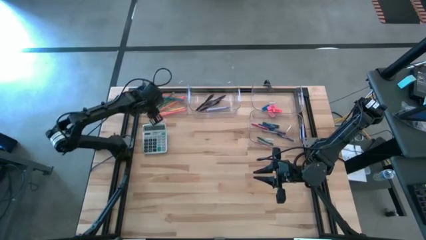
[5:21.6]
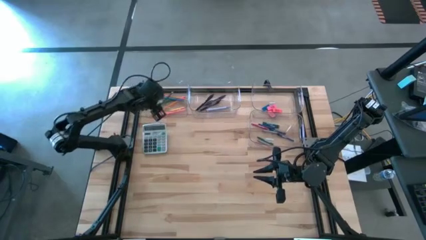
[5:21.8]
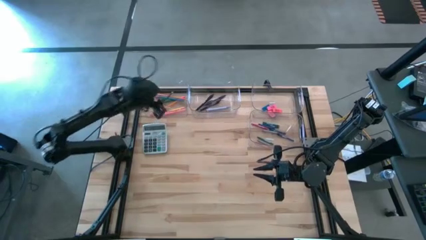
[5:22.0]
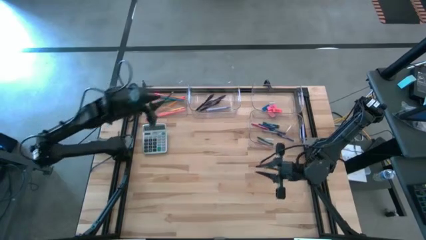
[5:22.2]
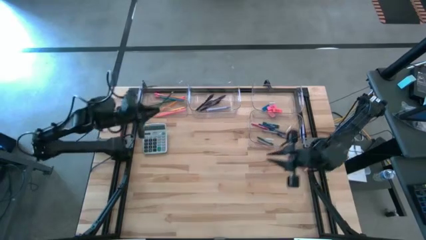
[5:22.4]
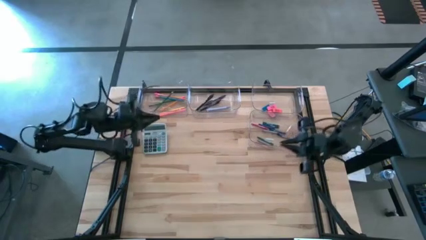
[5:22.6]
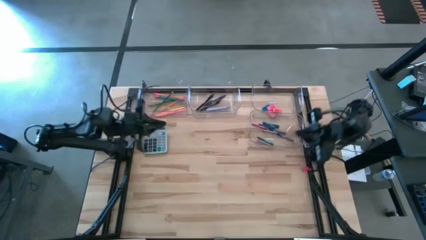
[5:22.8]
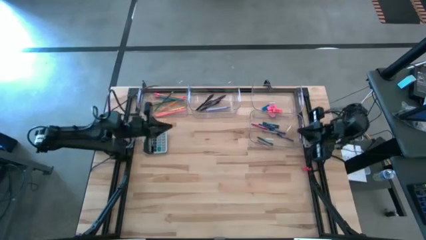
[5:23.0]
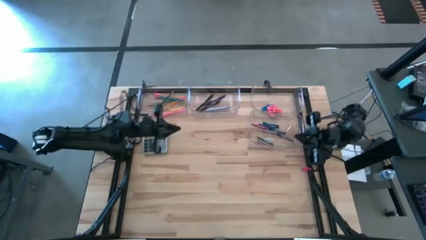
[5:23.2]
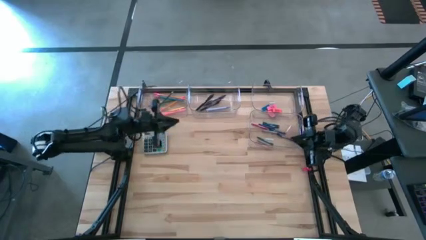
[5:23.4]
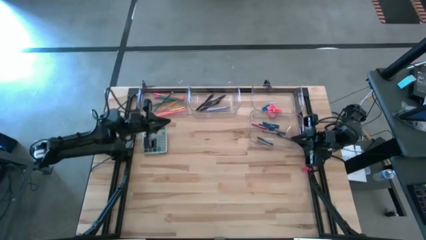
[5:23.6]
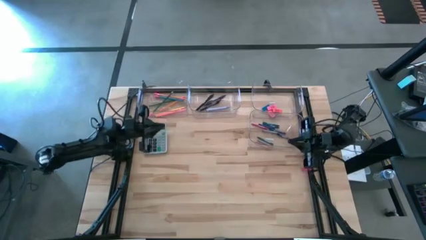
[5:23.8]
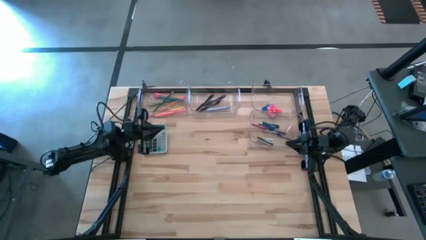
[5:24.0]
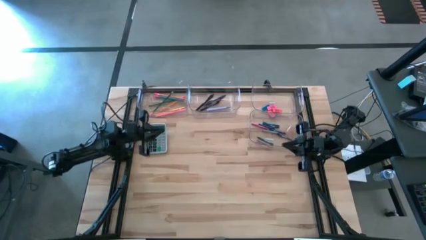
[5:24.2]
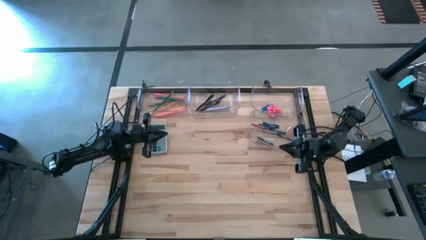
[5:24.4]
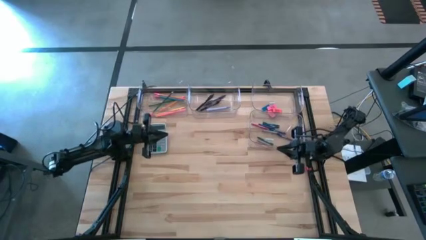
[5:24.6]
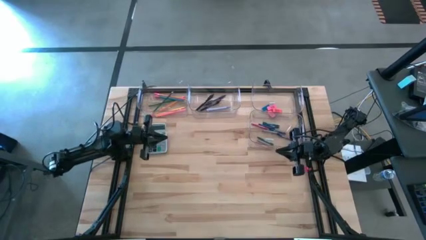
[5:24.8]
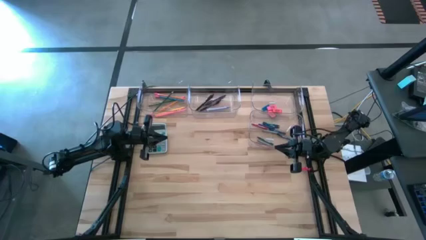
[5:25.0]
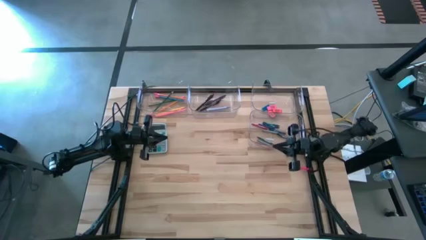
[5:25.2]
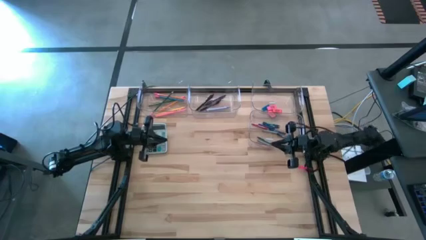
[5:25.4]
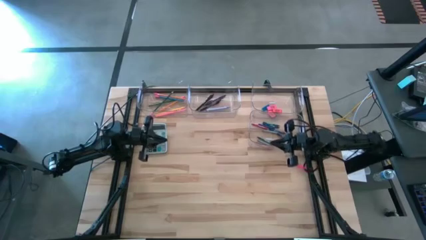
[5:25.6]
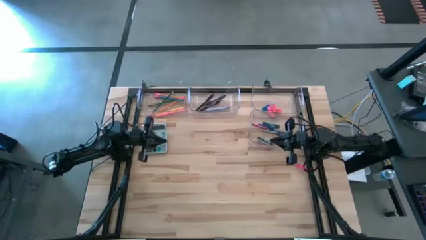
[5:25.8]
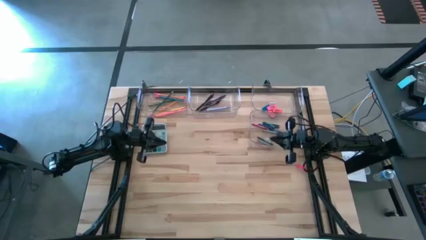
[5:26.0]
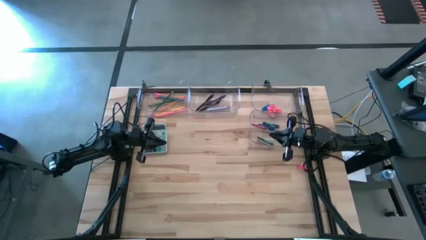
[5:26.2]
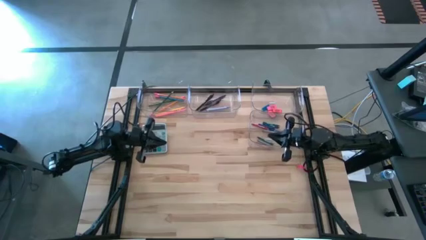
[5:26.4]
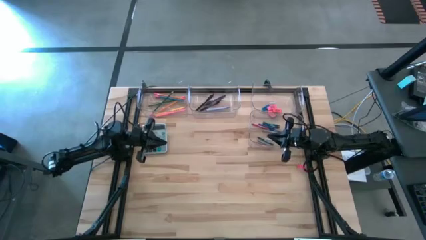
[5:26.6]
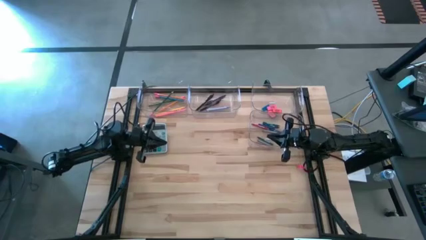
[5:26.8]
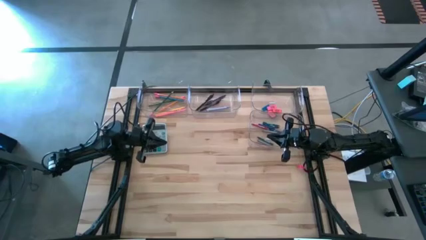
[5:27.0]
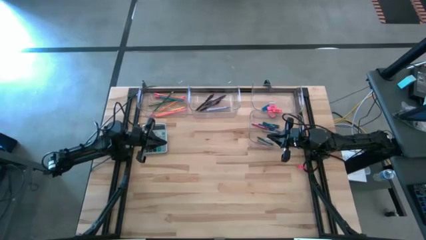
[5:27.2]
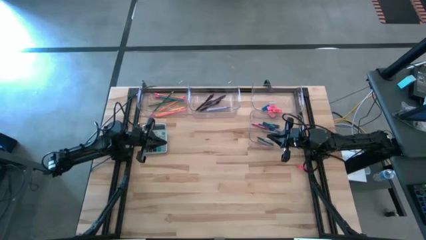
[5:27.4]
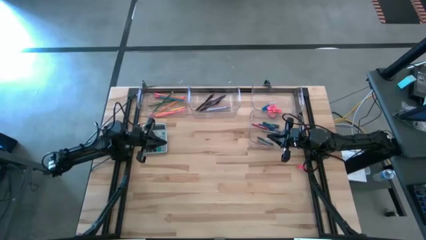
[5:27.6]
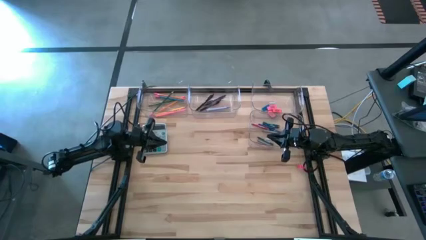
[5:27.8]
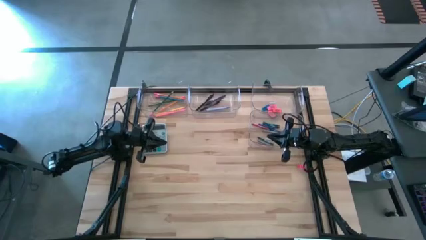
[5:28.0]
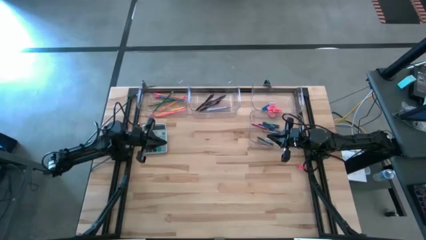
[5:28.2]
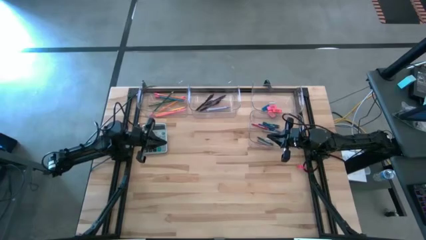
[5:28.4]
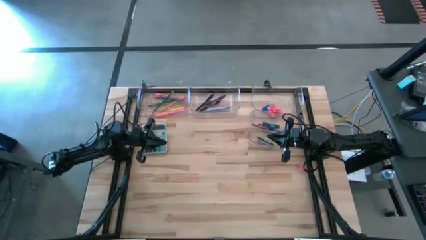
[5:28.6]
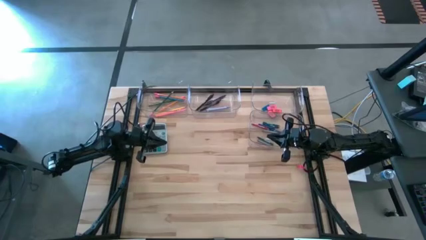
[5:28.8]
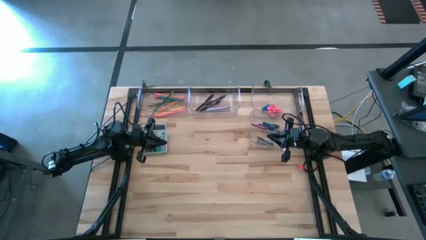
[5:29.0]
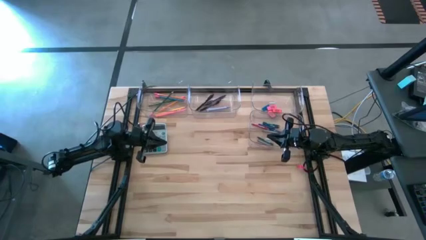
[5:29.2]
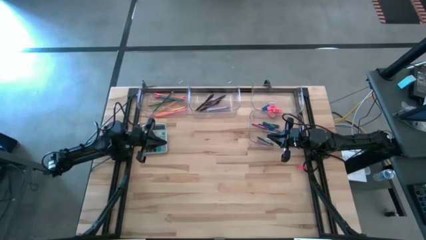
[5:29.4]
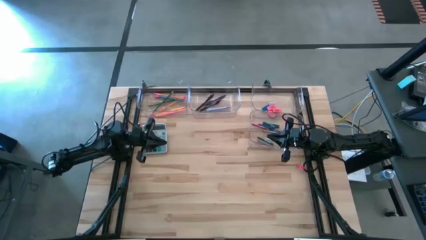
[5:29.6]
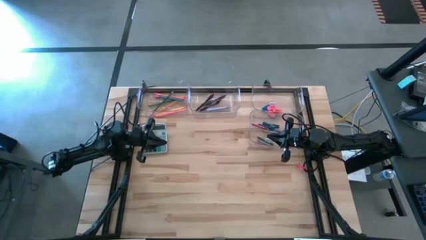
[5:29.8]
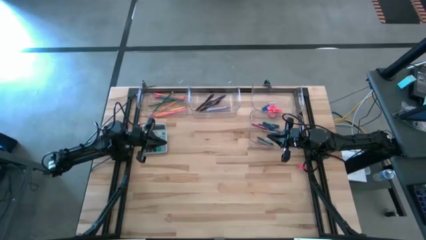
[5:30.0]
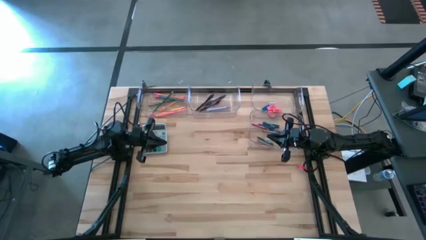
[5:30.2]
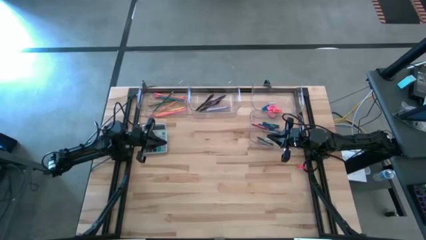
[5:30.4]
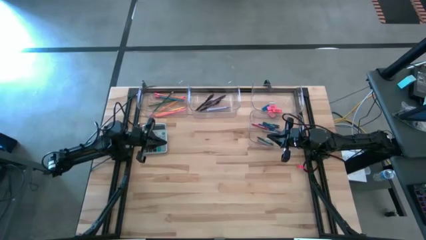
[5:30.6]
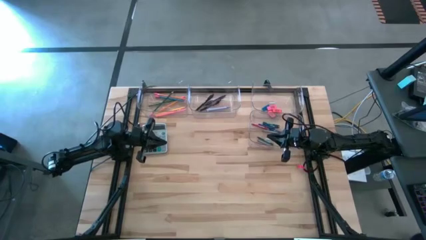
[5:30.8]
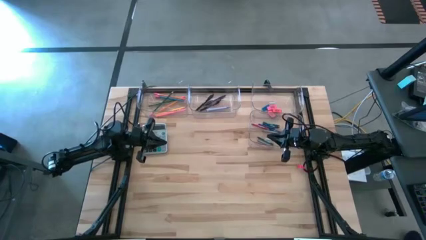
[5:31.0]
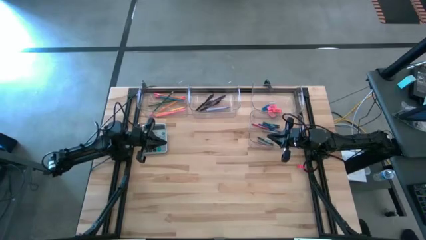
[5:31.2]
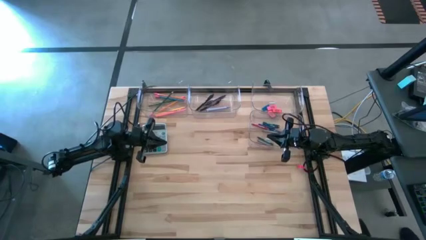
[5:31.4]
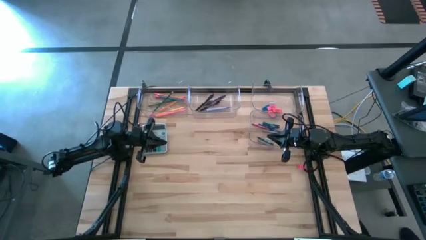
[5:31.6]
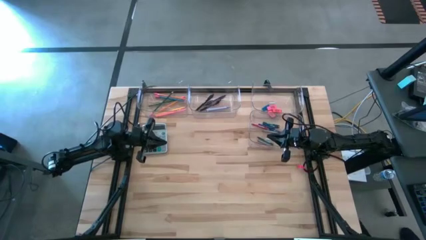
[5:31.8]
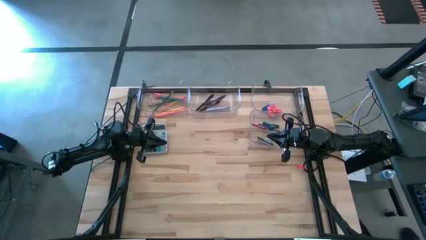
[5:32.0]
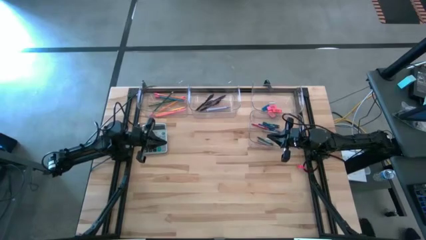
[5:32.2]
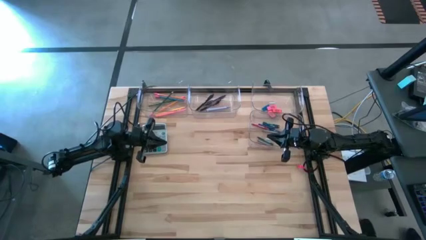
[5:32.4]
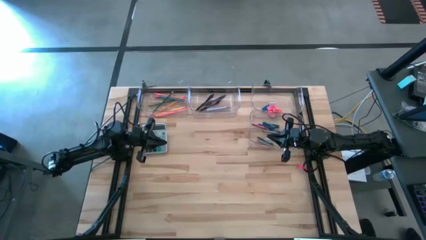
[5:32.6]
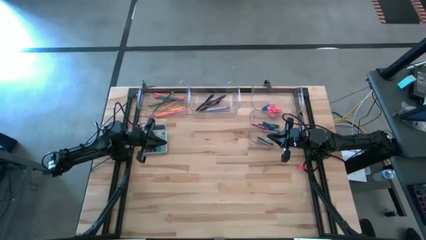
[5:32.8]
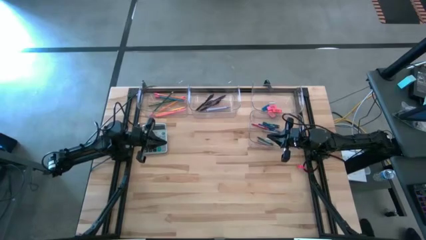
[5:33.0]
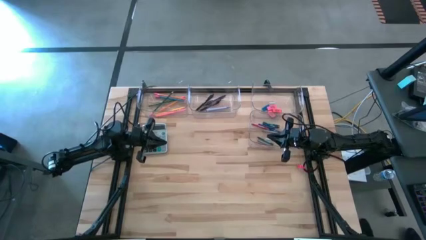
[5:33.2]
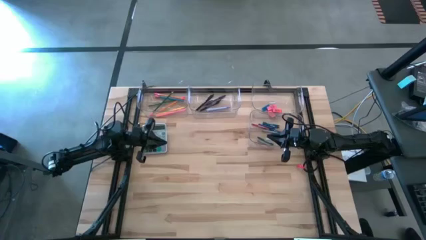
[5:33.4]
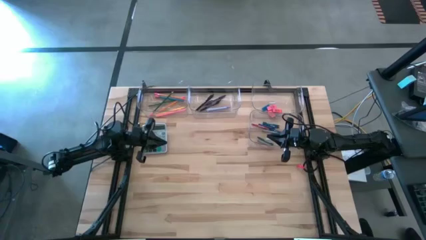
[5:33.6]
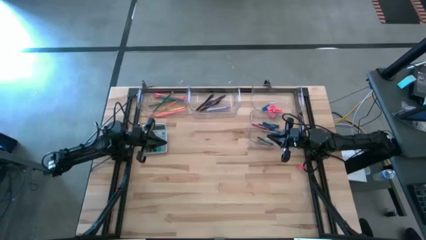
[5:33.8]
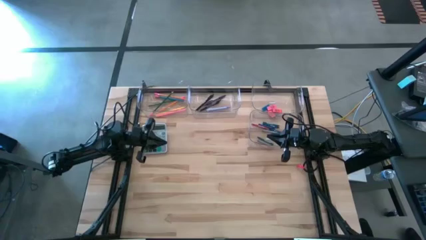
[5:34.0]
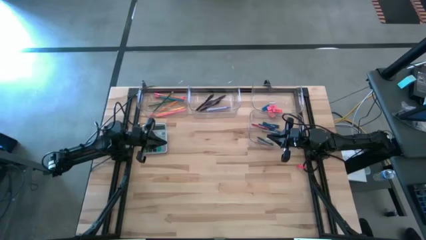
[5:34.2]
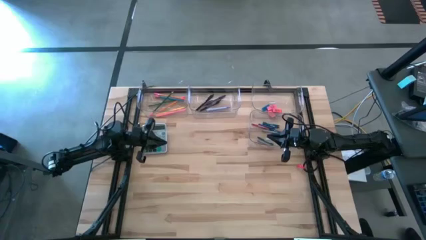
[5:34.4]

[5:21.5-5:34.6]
Task: Sort crayons/erasers/pens/pencils in bins
Return to Home Position

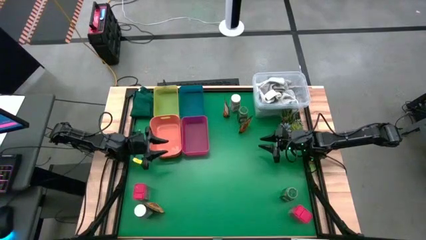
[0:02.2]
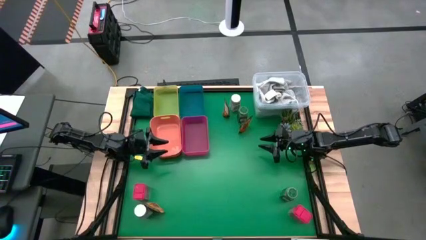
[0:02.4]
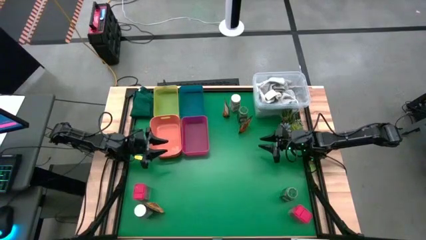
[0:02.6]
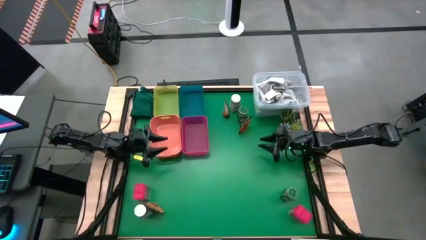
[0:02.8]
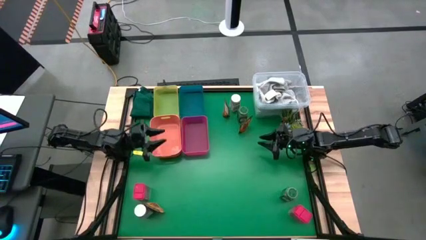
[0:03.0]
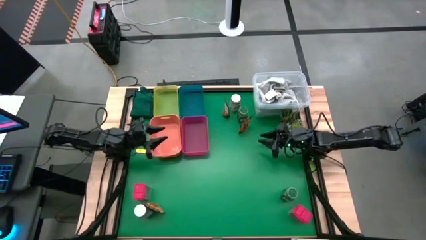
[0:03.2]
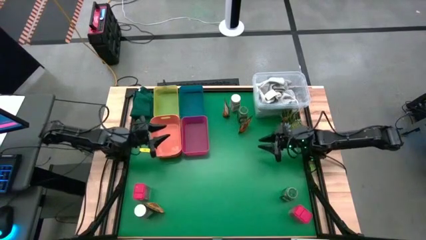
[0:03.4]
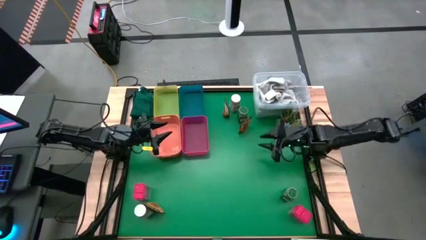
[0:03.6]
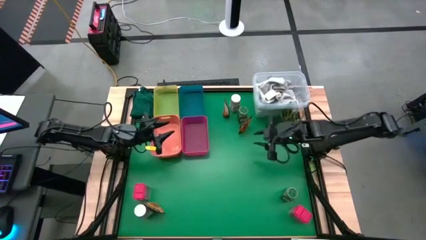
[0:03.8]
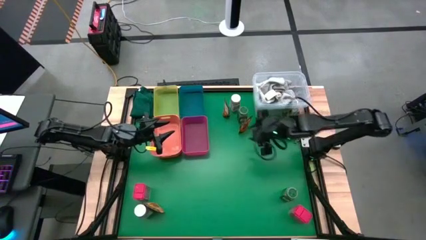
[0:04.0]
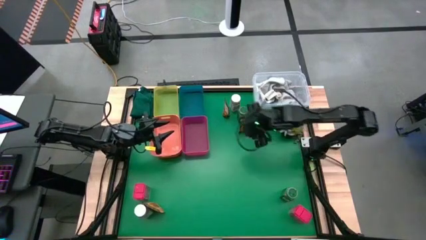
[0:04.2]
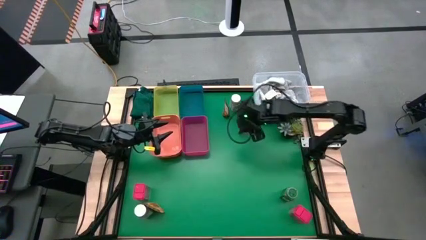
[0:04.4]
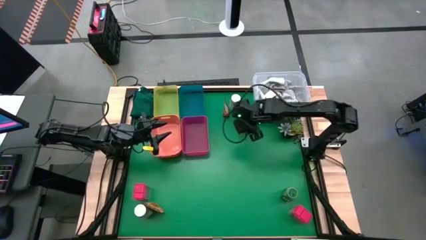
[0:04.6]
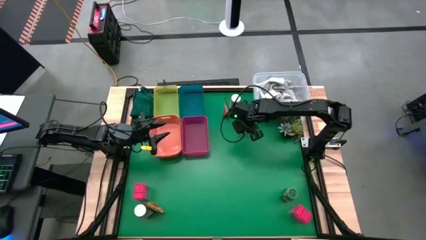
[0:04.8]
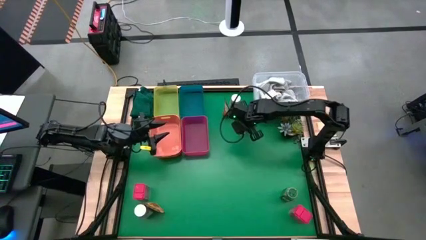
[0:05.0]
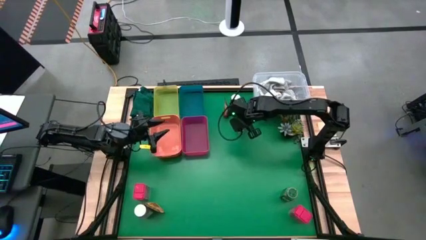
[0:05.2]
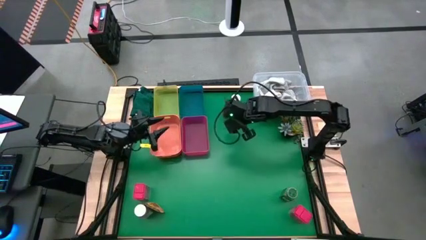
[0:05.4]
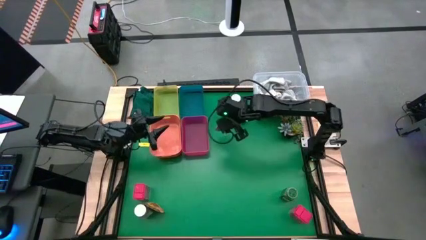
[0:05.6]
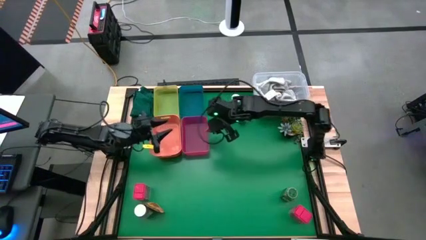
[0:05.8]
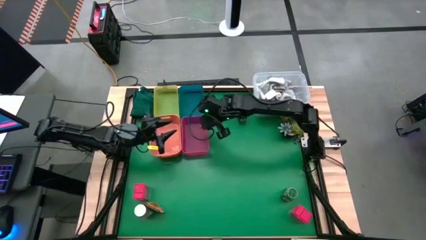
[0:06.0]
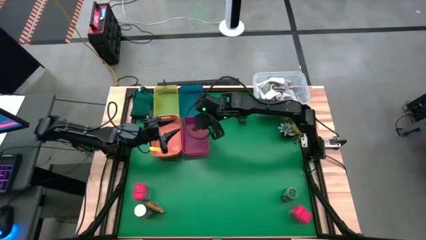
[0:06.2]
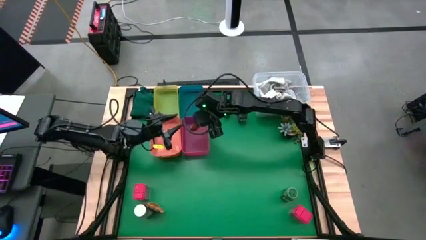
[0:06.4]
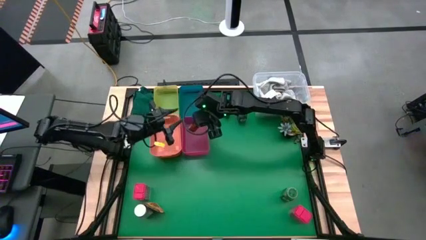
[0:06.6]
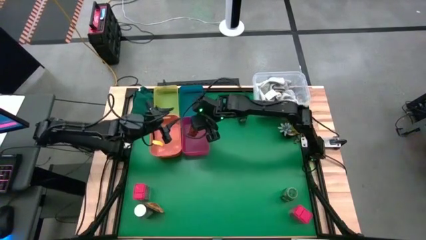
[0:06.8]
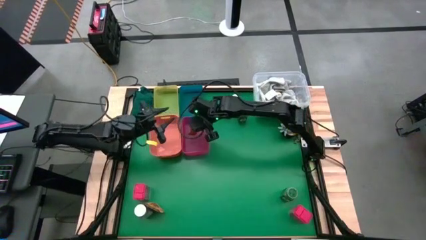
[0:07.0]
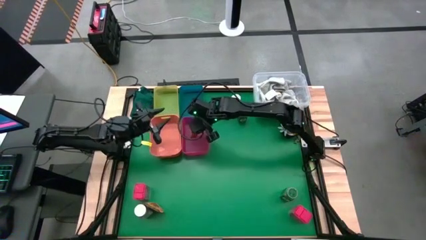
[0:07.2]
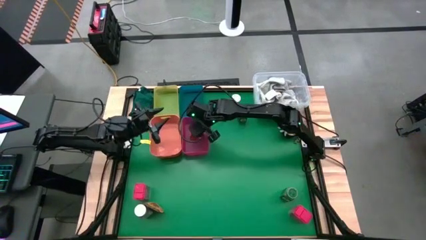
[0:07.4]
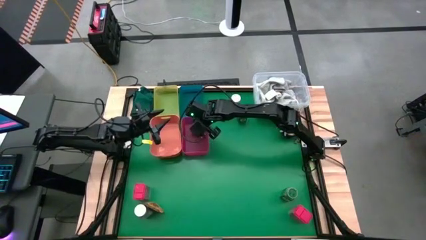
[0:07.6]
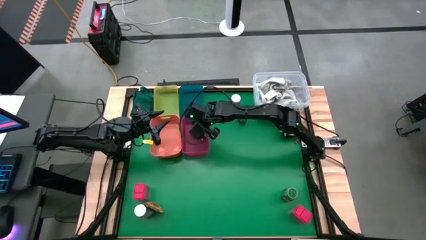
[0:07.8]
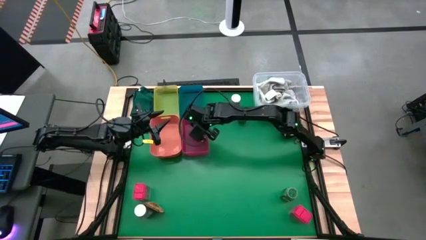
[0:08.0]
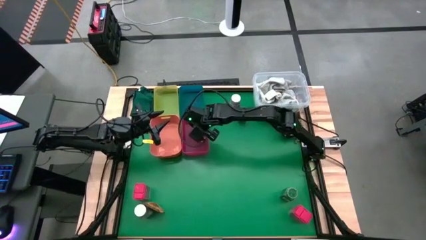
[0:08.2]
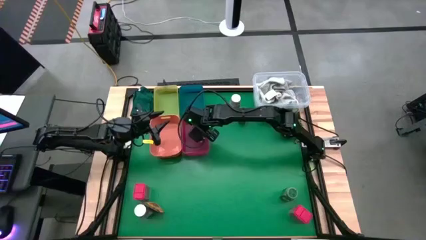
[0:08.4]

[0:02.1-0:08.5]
Task: Sort spices by type
Put the top right orange seasoning pack into the light red bin
